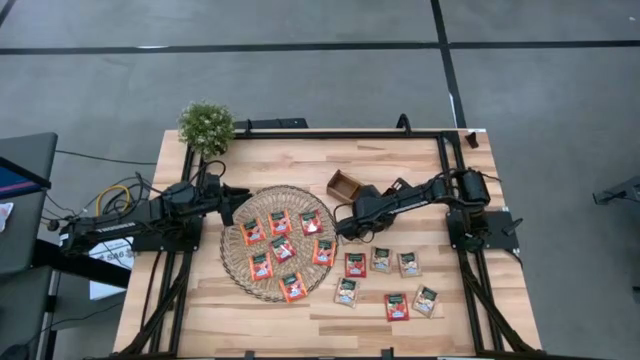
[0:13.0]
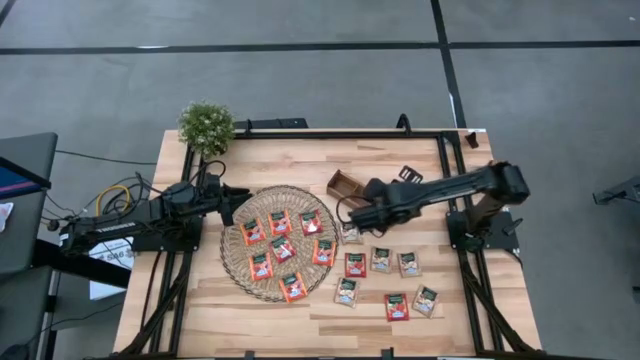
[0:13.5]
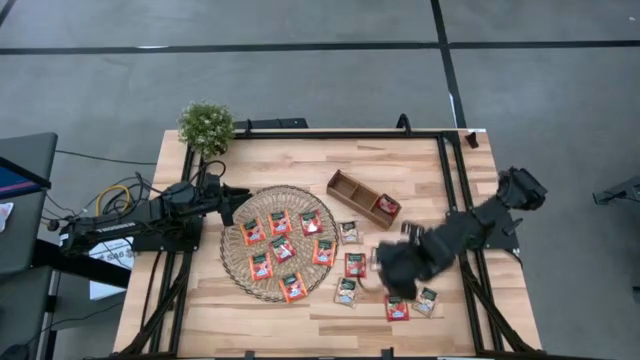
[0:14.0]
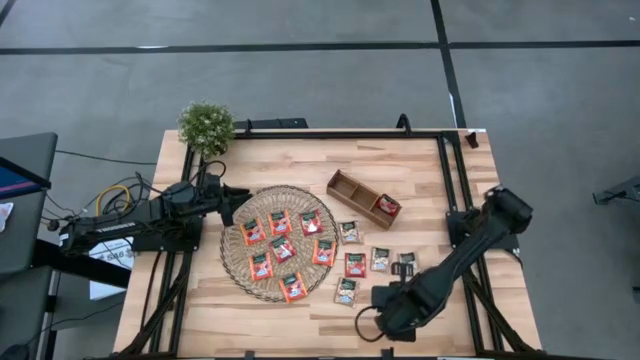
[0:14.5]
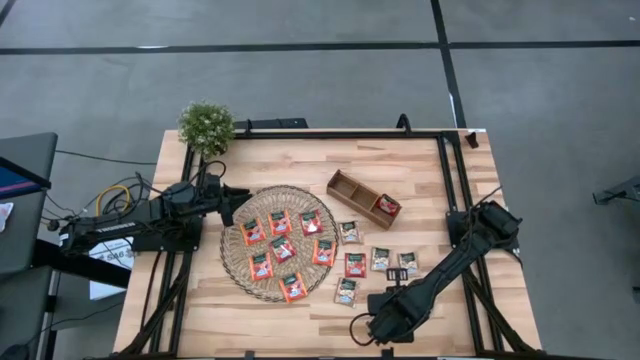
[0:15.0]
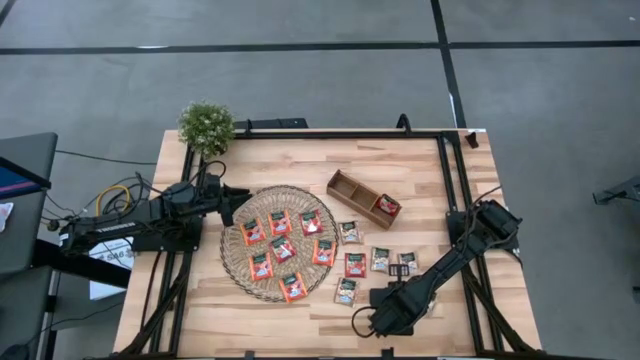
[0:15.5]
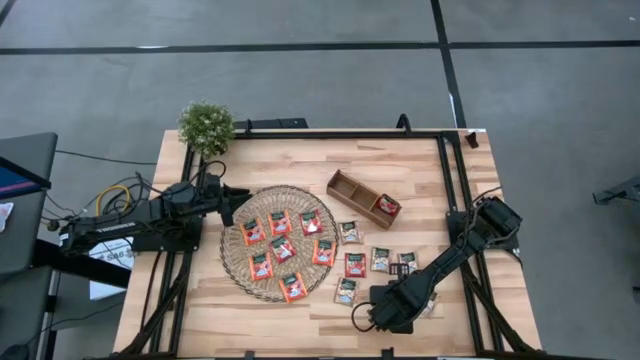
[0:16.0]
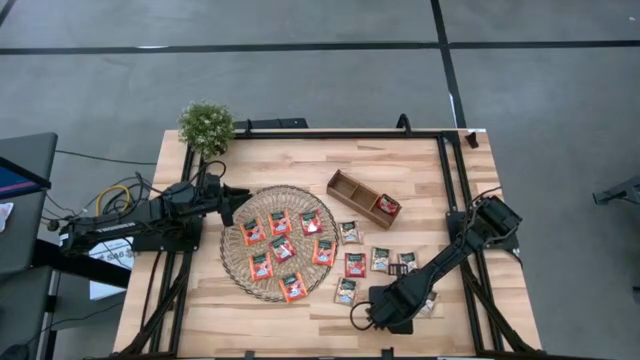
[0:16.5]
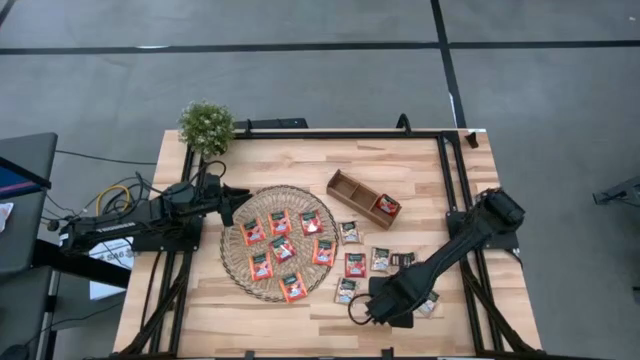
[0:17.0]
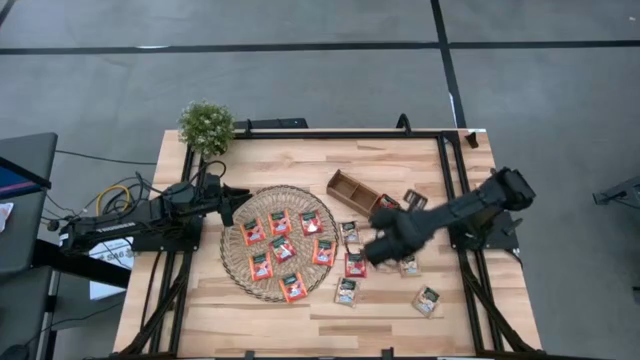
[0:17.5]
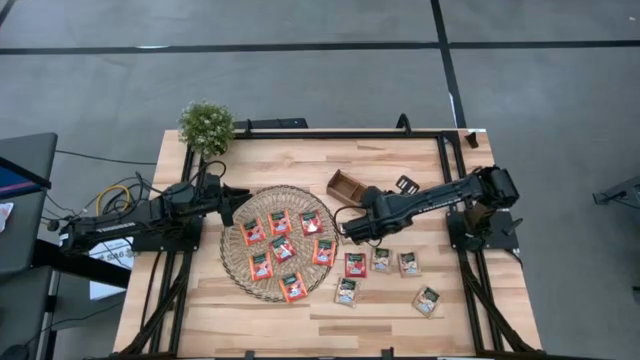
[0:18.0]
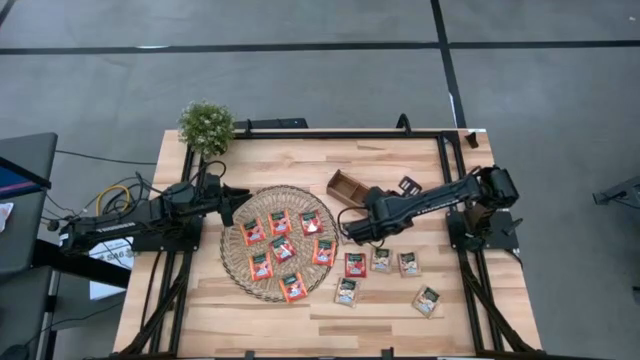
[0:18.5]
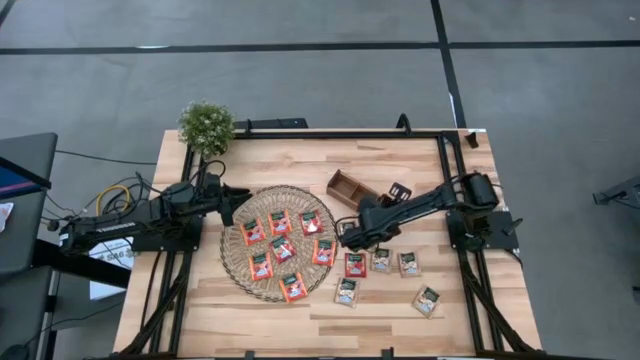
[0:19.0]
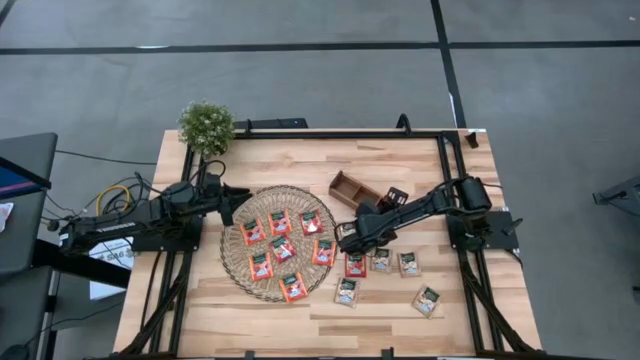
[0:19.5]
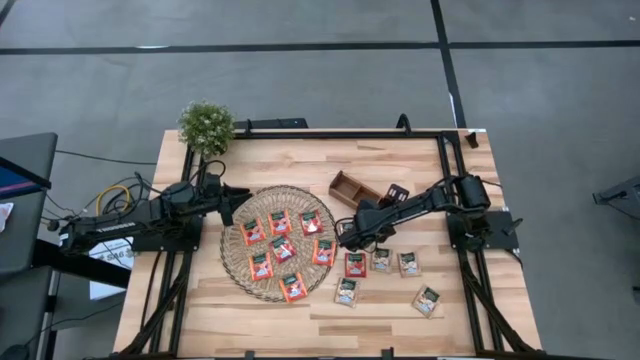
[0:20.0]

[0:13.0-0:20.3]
Task: Pick & Place Tea
Put the red tea bag into the right section of the wooden organizer

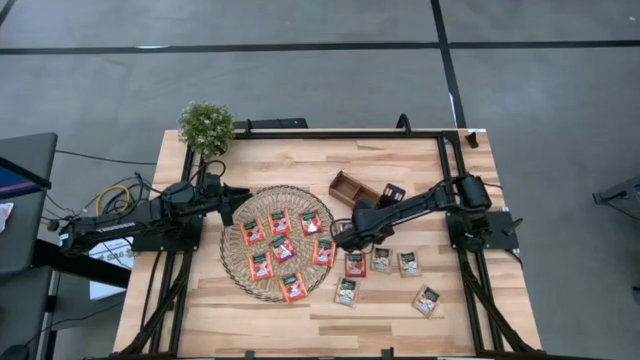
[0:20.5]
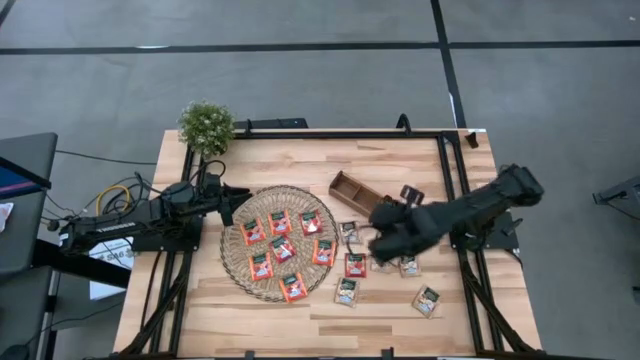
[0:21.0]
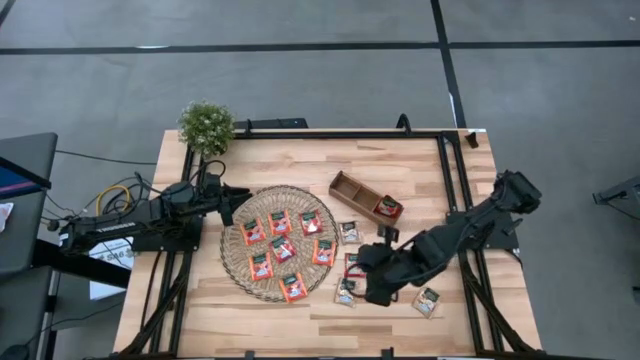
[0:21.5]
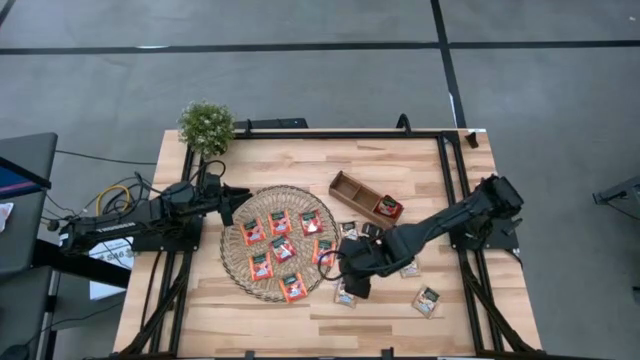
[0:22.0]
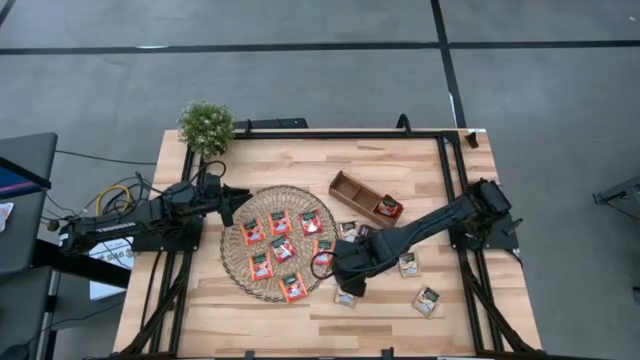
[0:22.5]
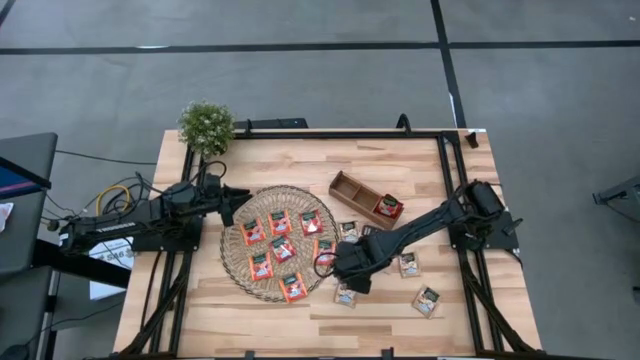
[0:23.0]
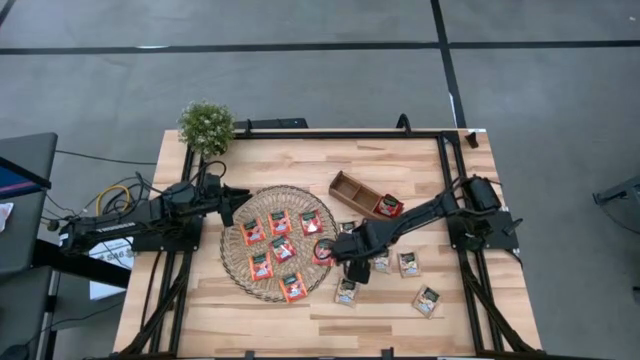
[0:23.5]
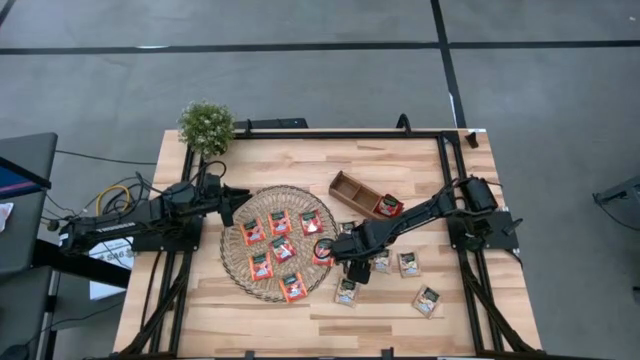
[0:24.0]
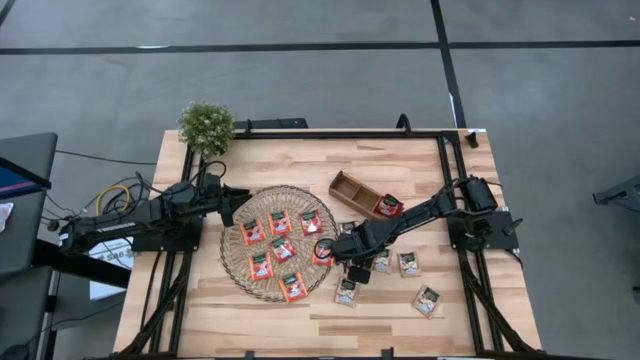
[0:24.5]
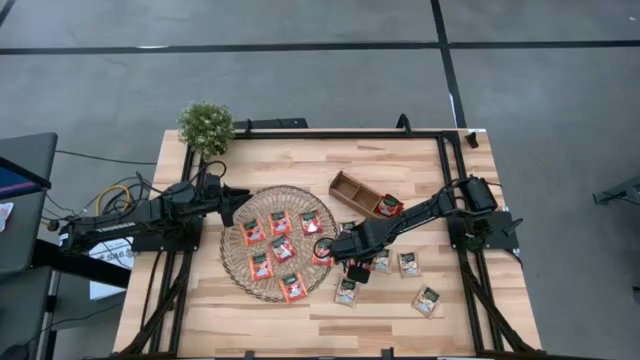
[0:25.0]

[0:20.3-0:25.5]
Put the red tea bag into the right section of the wooden organizer

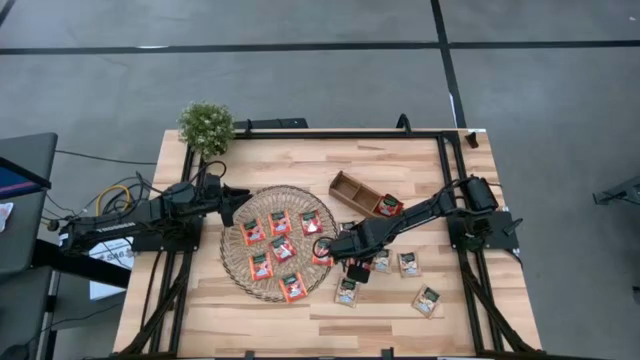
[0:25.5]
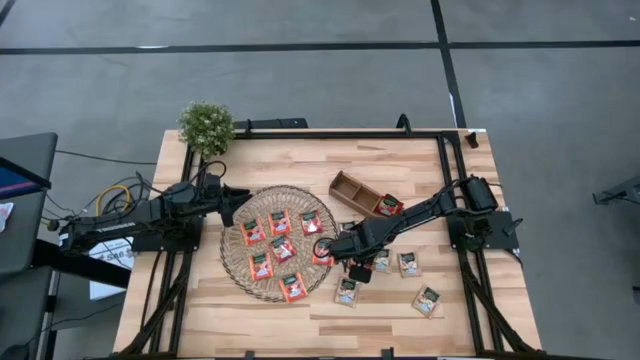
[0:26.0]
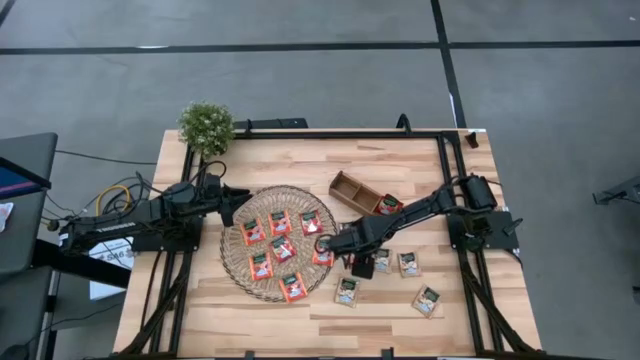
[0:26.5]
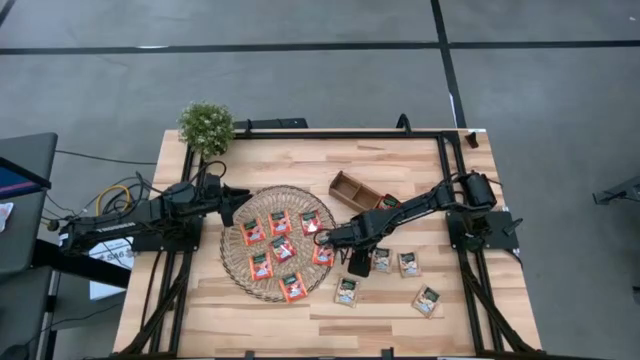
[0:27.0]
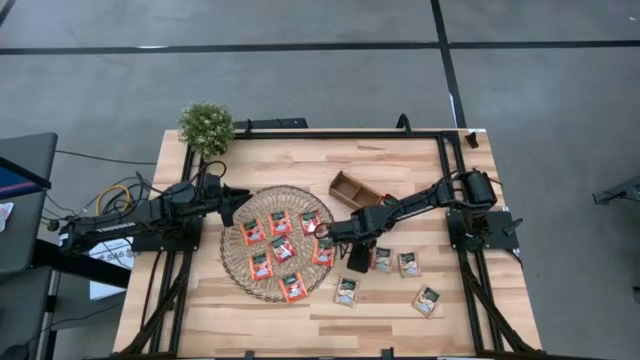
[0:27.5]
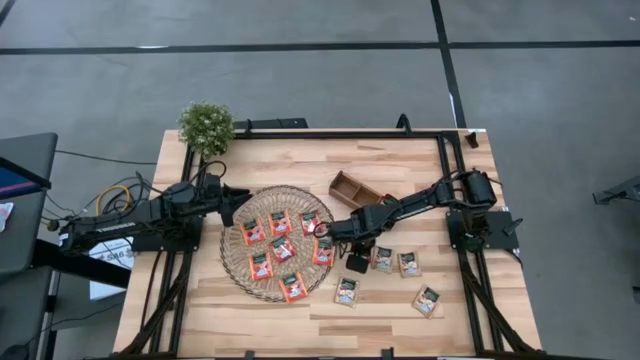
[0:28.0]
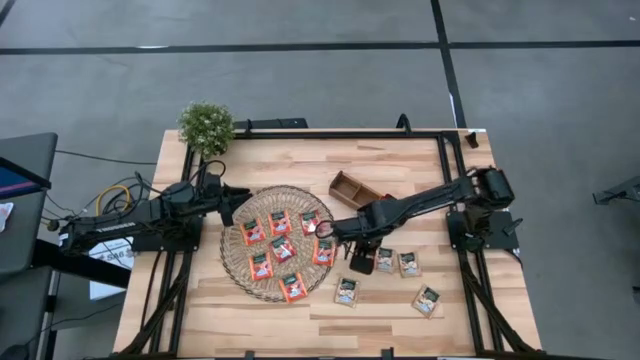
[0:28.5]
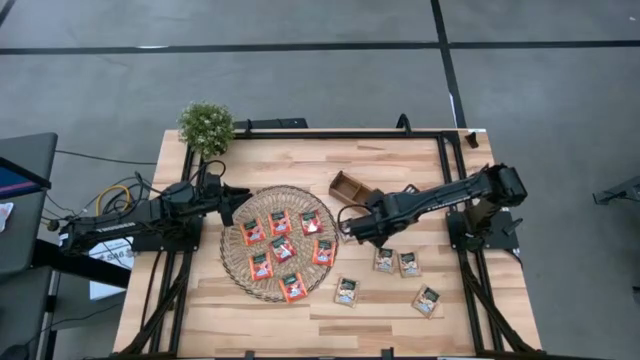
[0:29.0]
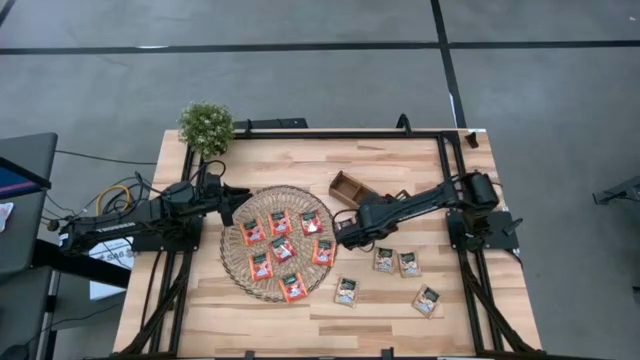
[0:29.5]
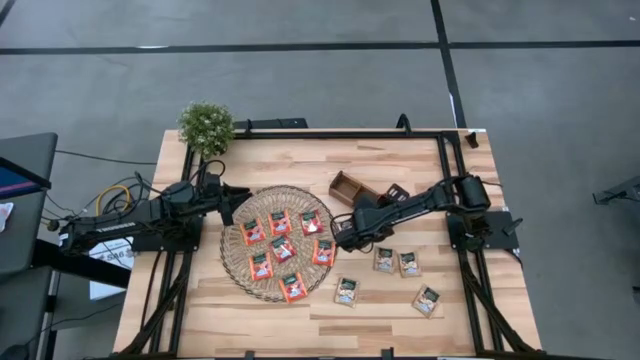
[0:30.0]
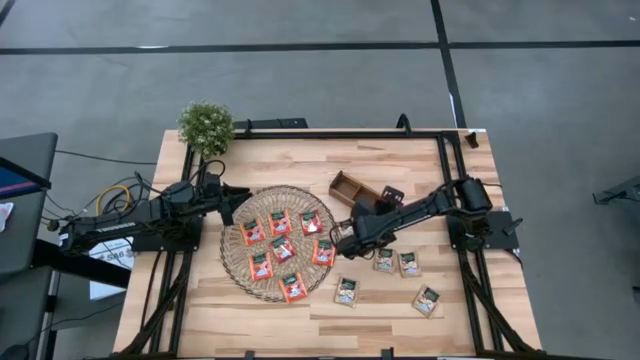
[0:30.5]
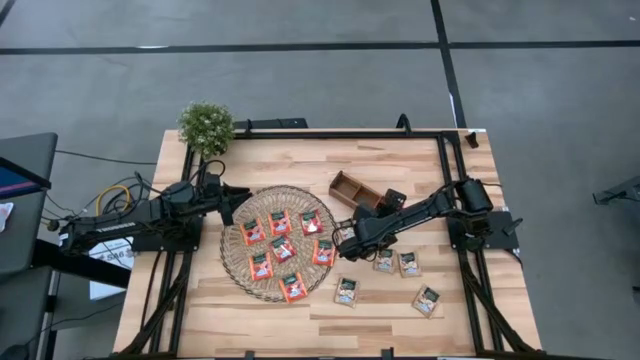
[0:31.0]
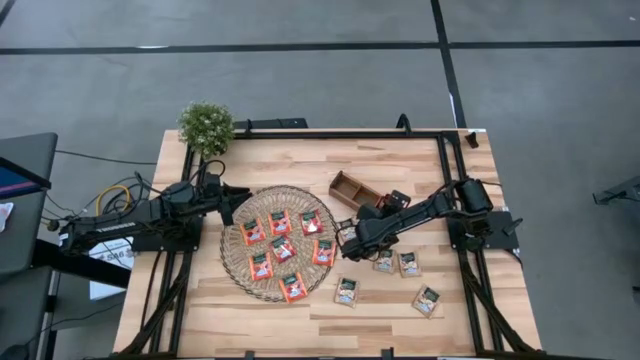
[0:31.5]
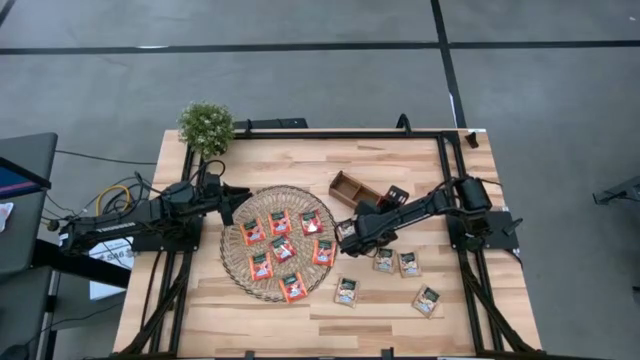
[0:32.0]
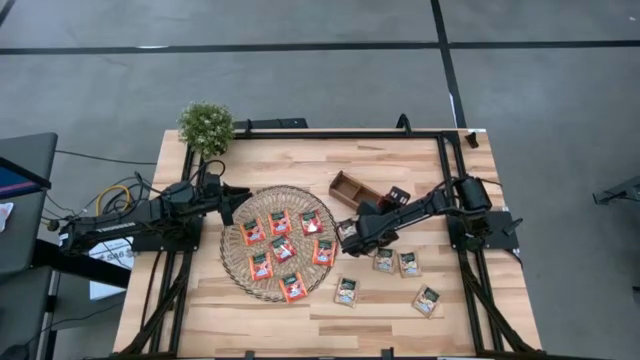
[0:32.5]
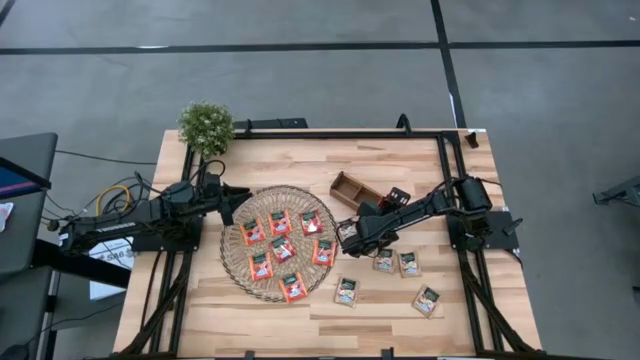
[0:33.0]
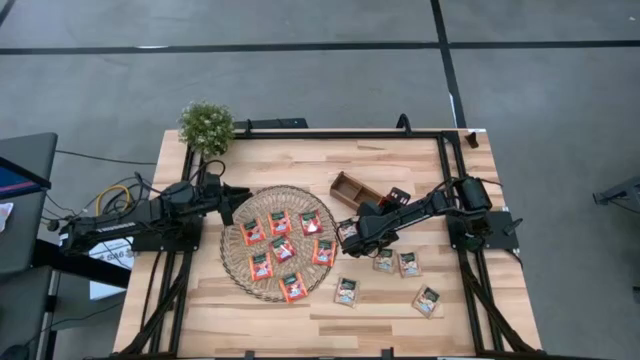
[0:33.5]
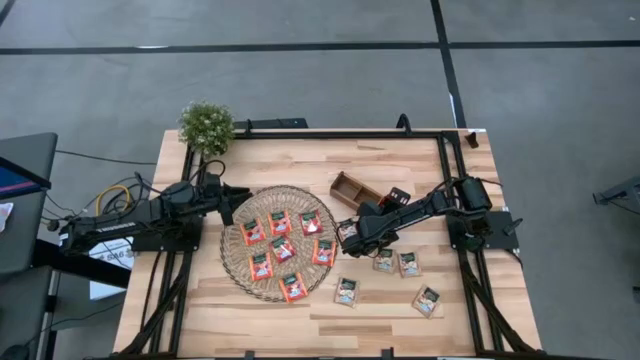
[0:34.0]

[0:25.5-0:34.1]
Put the red tea bag into the right section of the wooden organizer

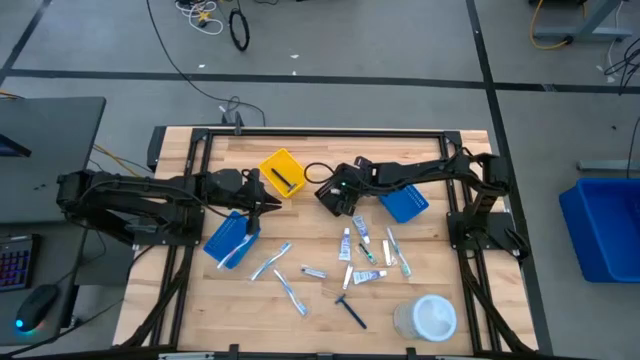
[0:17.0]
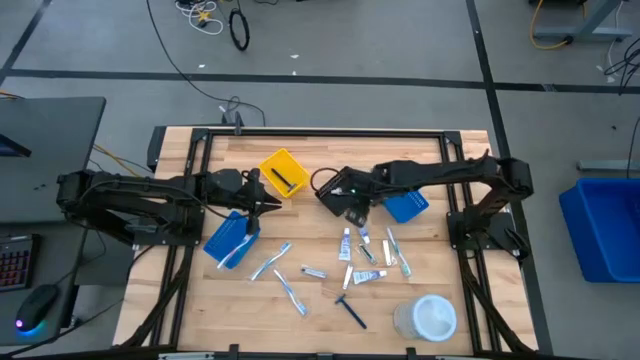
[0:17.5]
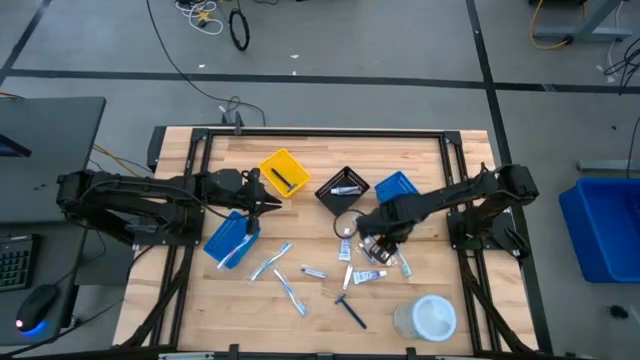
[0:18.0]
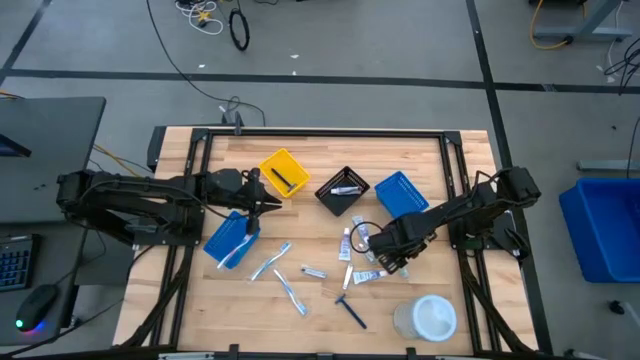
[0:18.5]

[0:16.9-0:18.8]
Task: Pick & Place Travel size toiletries
Adjust the green toothbrush
